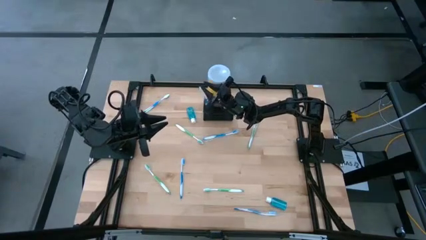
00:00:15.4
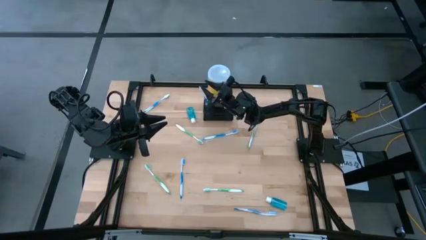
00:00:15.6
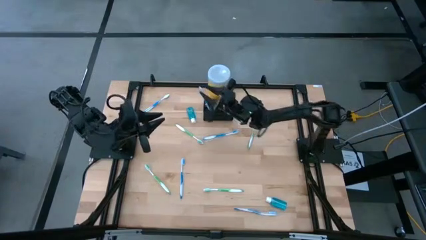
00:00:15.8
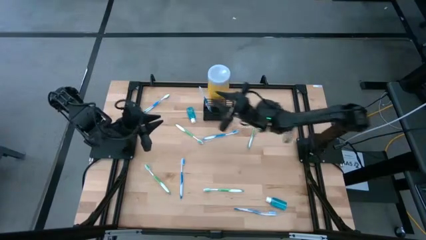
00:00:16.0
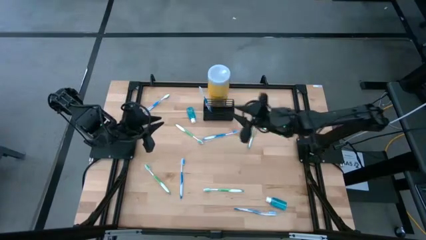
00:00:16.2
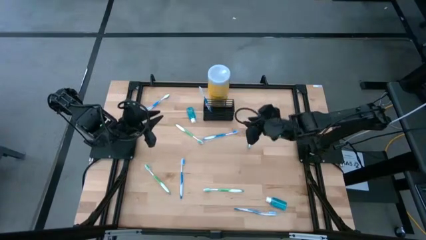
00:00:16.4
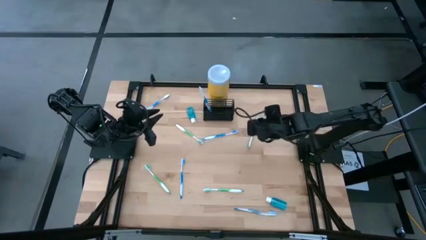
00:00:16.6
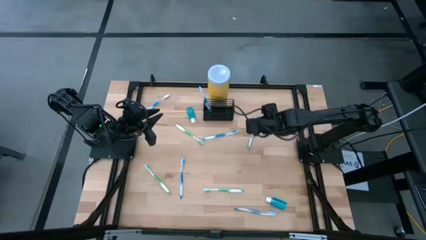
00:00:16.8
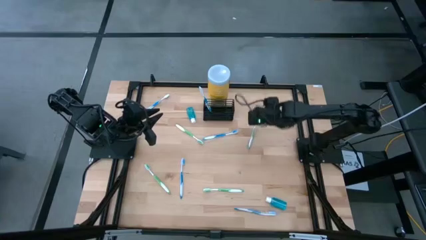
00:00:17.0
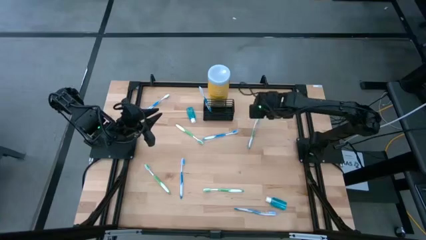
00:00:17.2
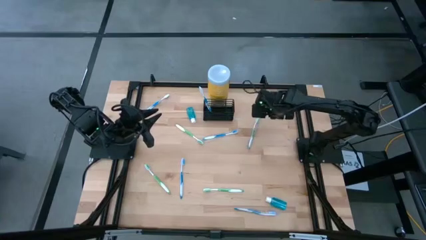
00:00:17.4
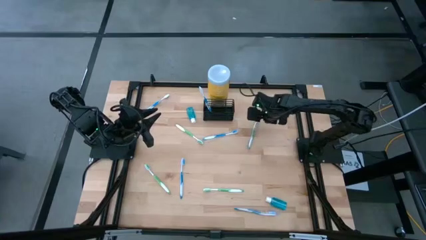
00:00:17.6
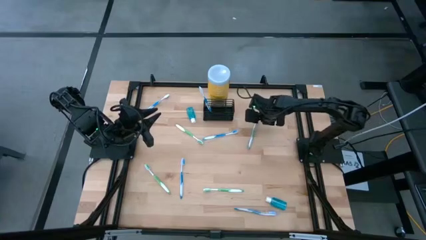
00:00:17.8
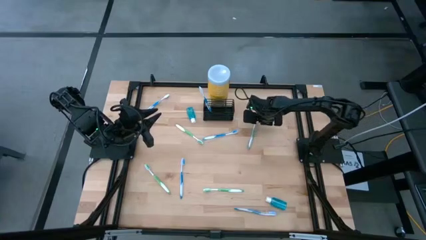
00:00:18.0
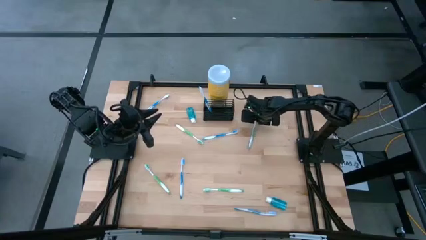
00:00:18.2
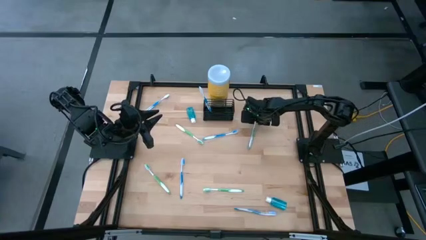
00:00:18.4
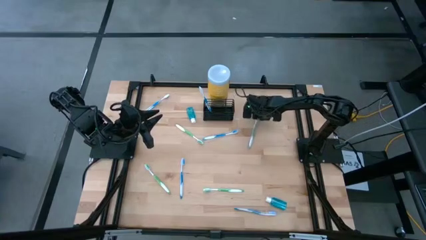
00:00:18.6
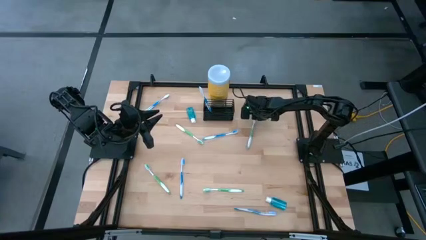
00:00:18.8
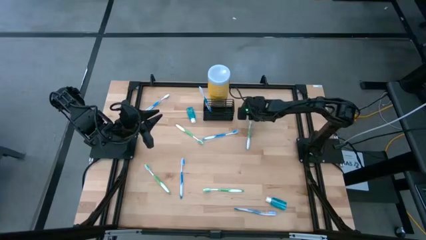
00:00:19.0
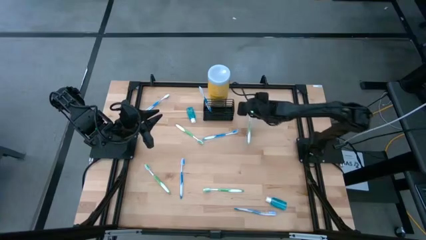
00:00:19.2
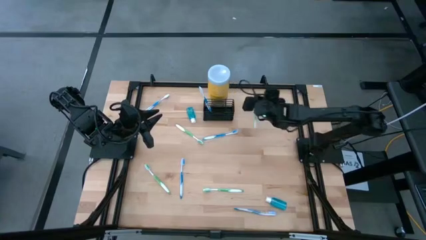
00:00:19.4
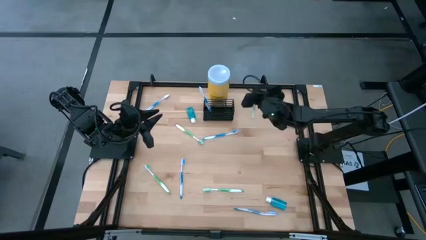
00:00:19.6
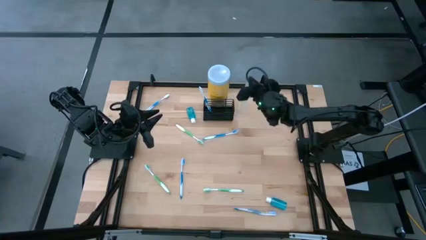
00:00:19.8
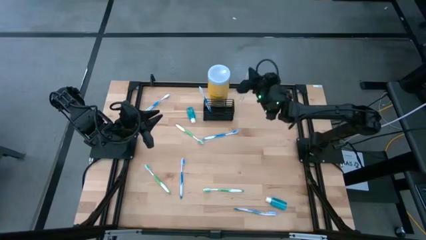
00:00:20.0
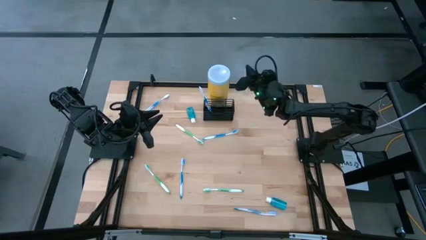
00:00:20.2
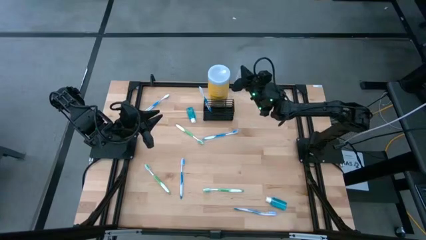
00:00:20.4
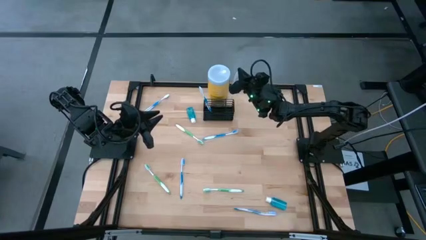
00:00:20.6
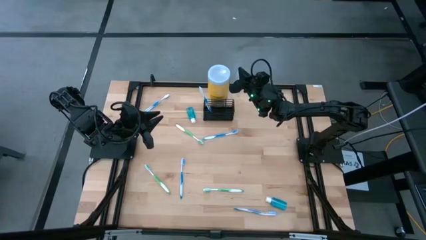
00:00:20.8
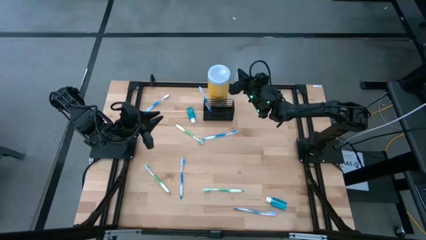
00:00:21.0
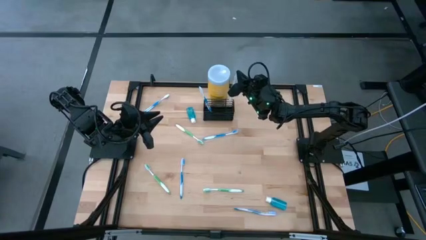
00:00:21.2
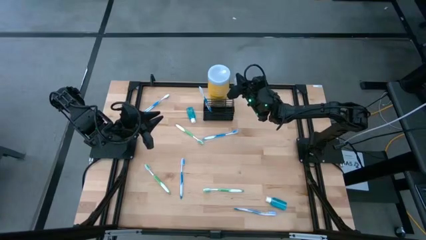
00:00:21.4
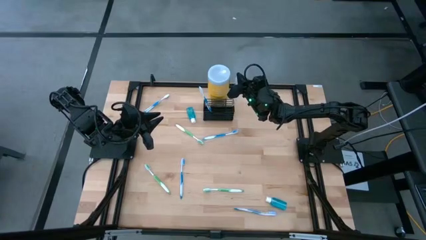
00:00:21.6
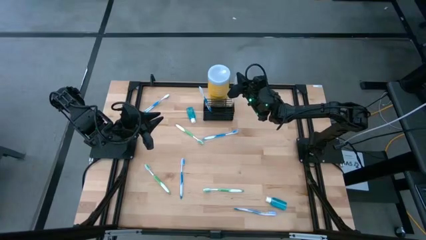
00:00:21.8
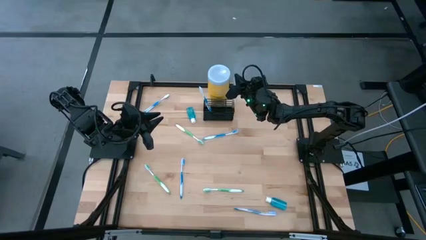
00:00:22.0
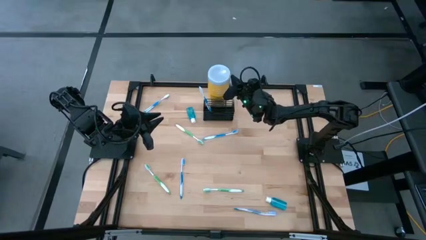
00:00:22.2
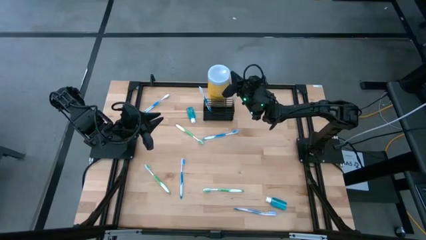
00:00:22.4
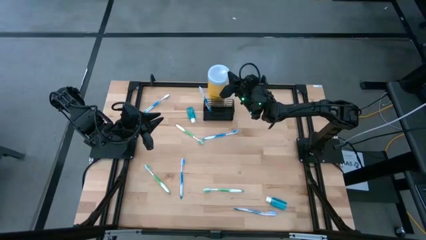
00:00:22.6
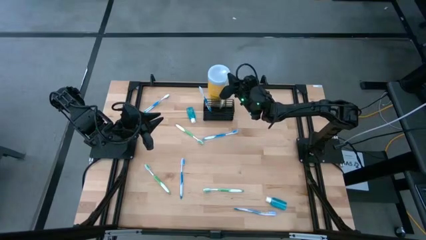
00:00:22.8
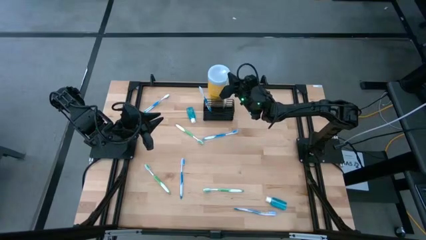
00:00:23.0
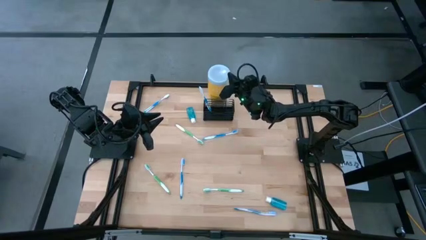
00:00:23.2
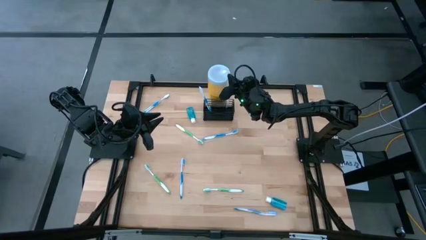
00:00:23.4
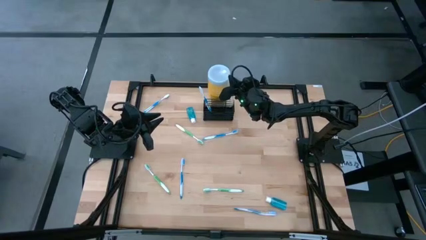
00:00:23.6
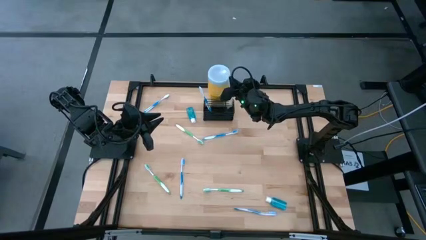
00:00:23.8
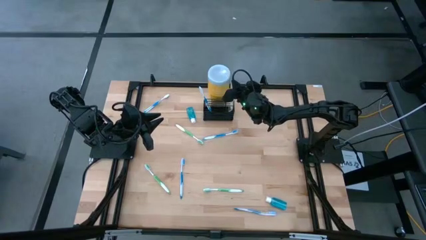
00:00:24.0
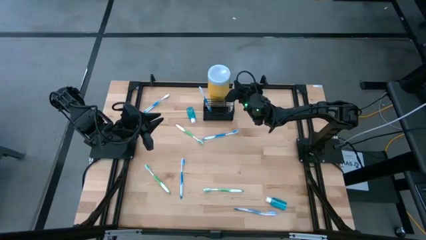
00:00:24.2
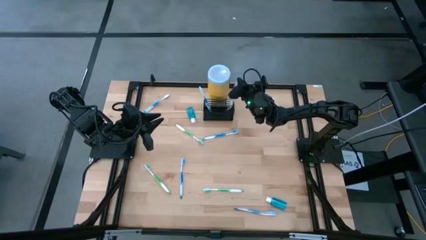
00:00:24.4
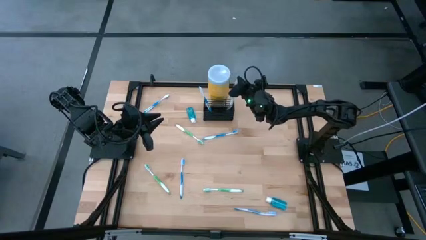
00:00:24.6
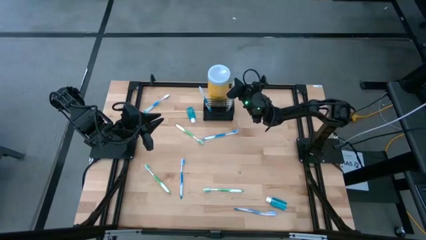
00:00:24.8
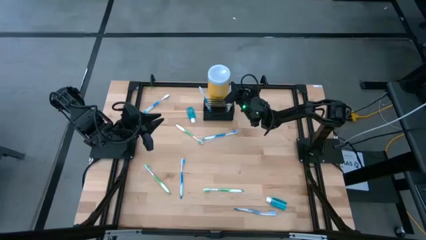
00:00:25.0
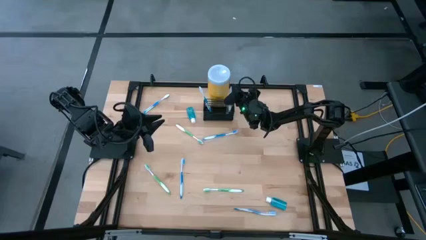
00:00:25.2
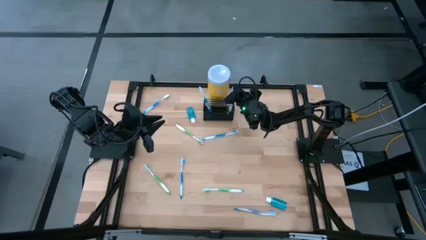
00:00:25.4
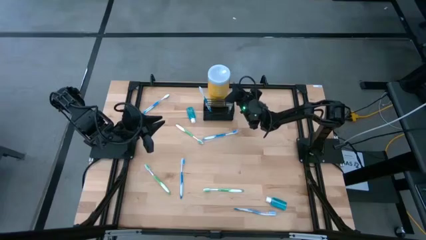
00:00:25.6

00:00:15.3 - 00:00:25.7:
Task: Pick & Place toothbrushing station
Put the green toothbrush in the wire organizer

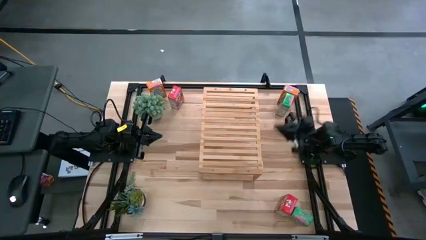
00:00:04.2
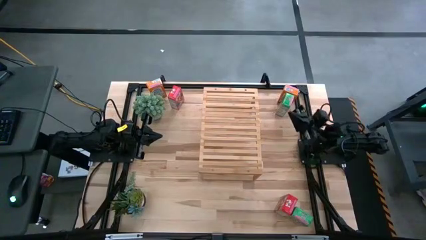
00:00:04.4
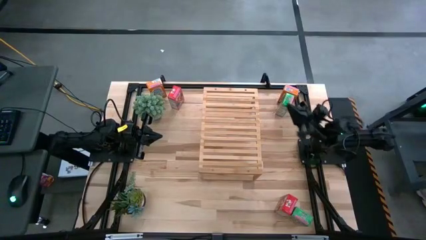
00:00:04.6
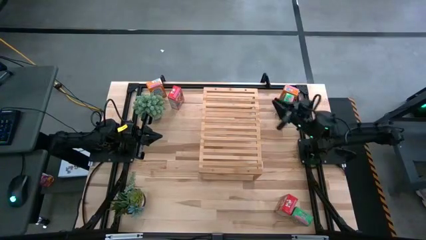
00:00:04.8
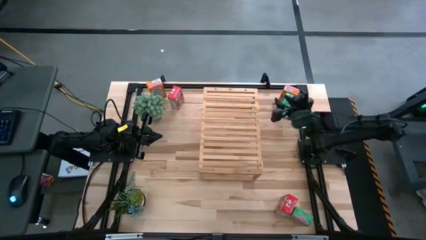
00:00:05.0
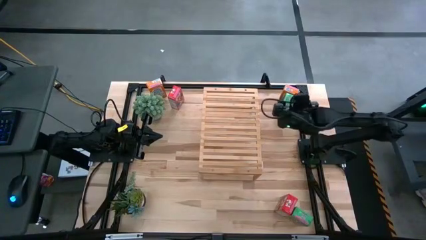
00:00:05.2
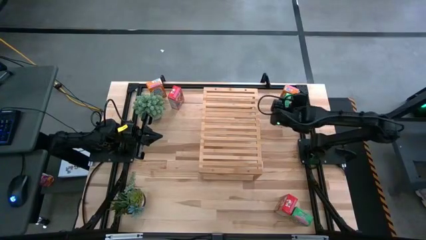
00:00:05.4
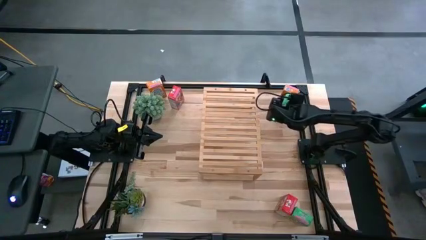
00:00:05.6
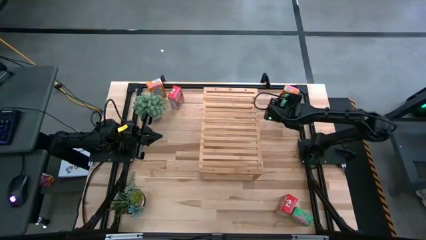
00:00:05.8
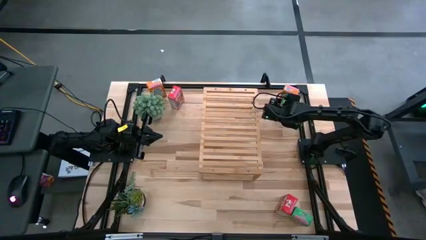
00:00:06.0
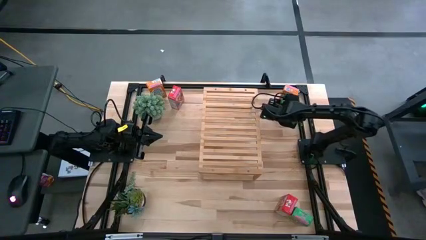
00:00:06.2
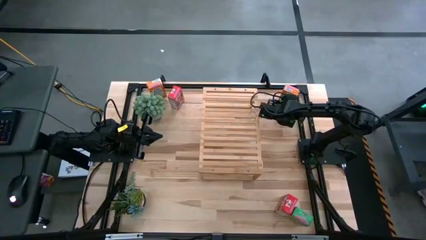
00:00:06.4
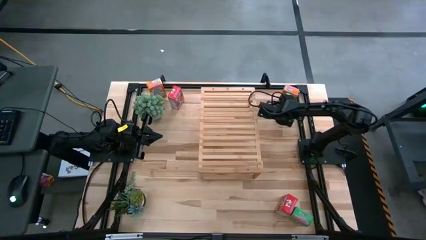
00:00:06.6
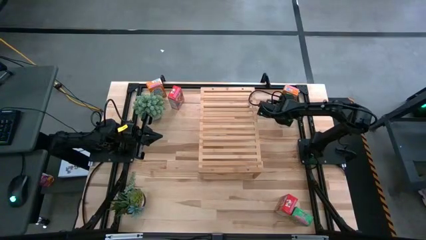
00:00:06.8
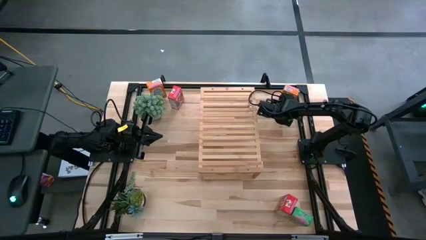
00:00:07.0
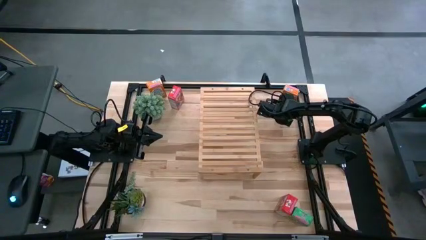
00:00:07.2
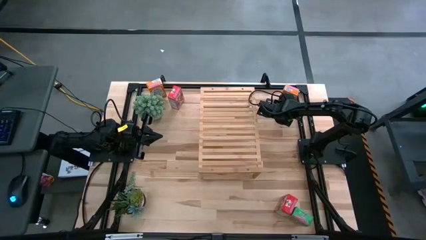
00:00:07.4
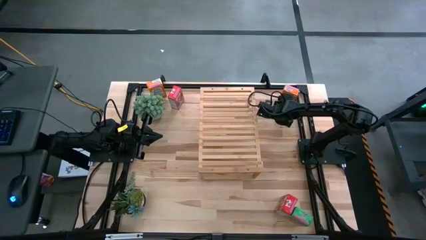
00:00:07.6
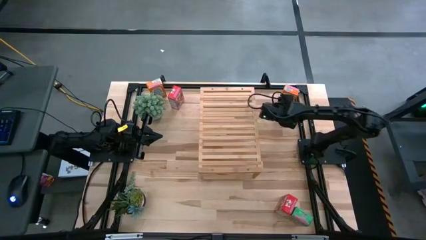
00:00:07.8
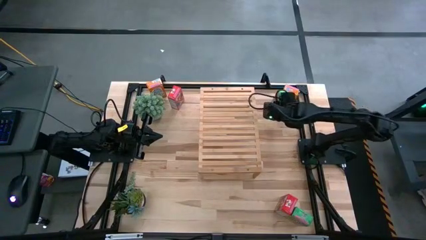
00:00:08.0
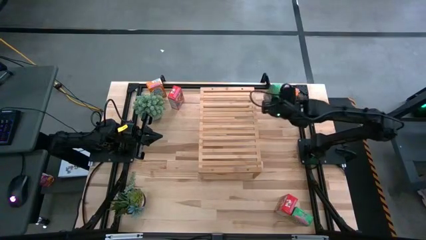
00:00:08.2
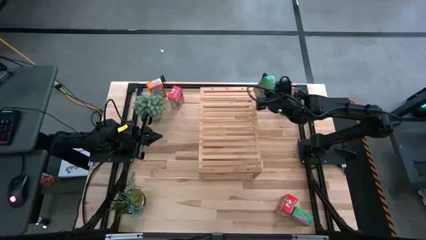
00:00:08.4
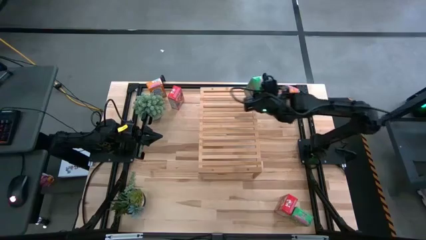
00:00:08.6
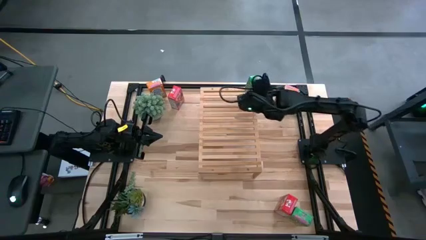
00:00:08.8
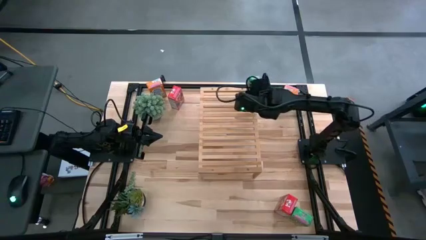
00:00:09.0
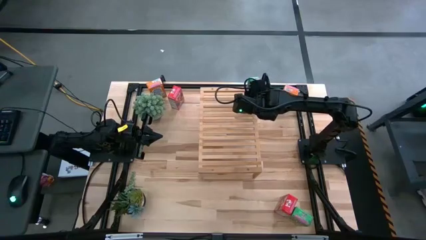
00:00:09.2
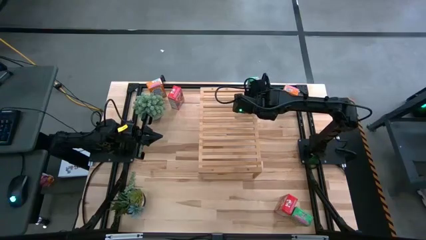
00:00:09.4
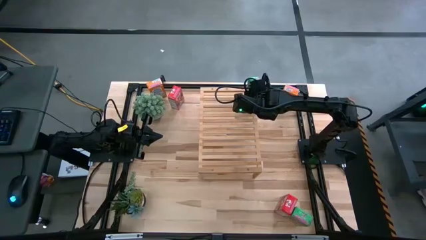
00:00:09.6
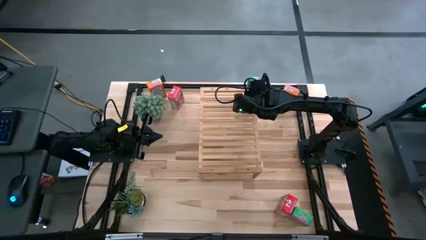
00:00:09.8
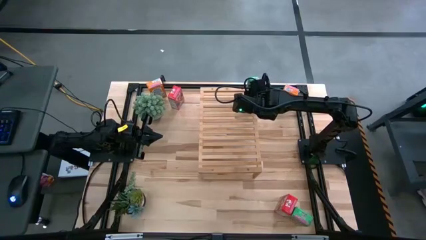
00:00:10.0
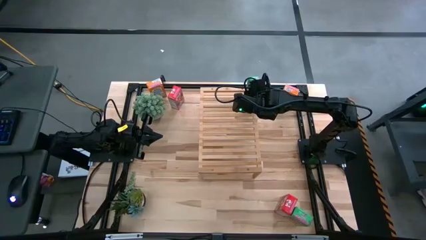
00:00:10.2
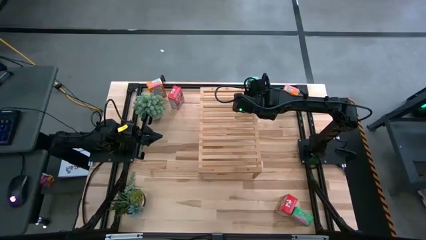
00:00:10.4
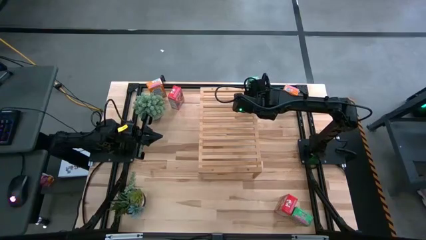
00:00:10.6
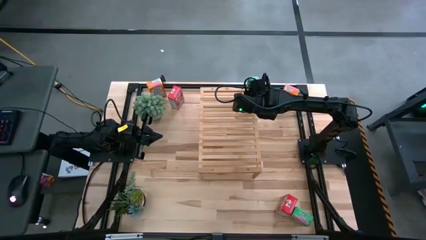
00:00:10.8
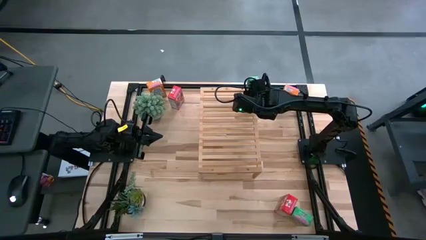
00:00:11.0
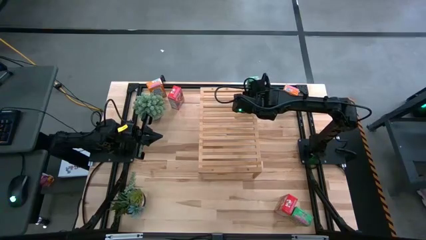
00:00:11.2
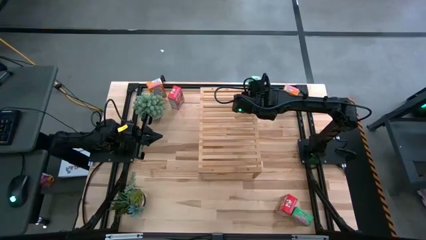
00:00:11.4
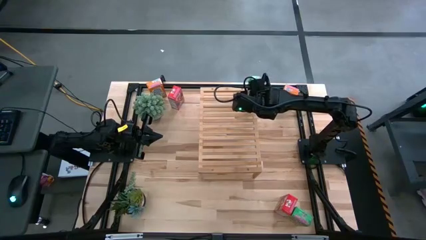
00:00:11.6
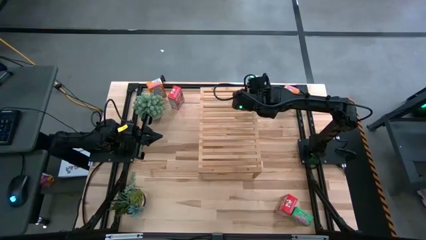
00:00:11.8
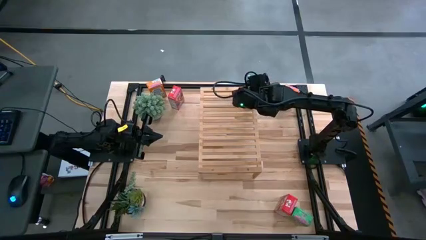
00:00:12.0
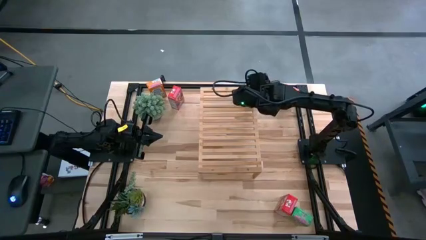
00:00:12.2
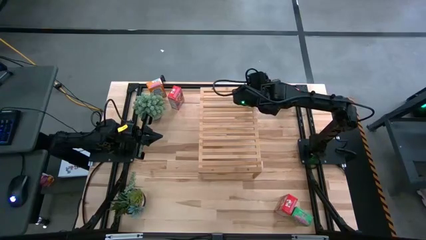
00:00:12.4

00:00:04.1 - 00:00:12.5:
Task: Stack cereal on shelf
Put the top green cereal box on the shelf
